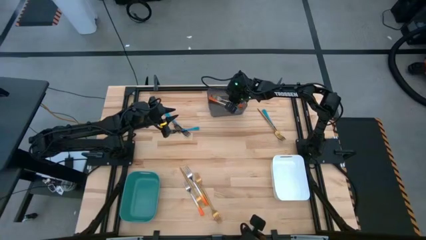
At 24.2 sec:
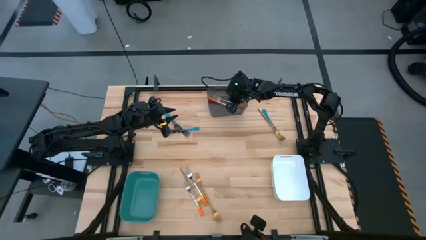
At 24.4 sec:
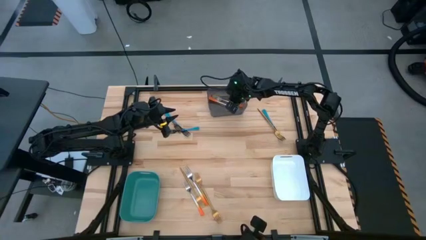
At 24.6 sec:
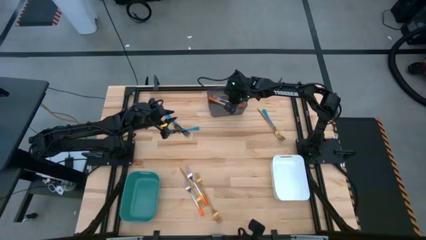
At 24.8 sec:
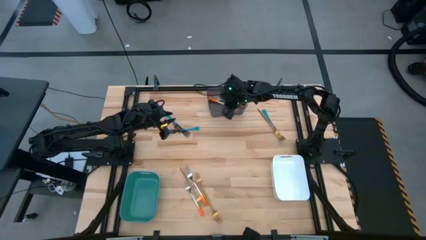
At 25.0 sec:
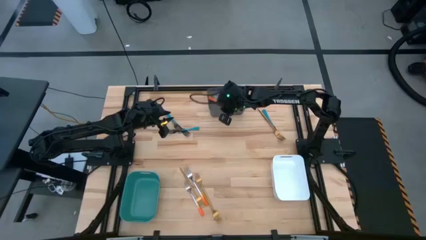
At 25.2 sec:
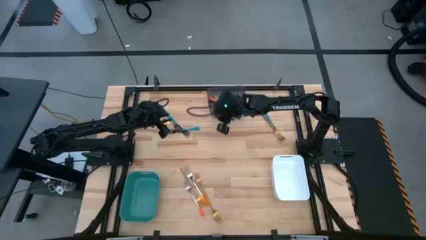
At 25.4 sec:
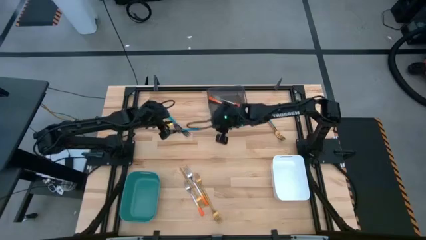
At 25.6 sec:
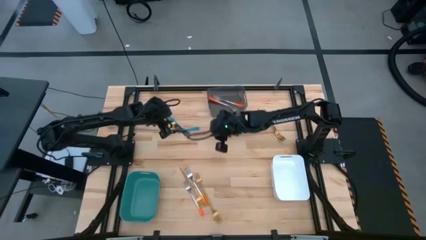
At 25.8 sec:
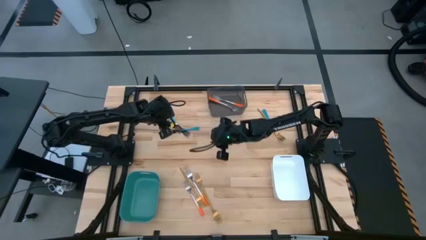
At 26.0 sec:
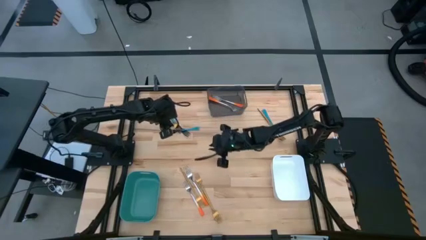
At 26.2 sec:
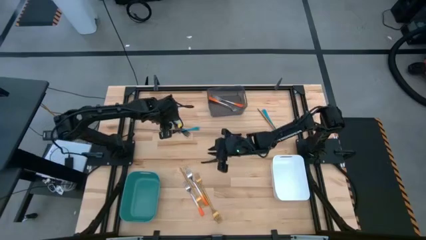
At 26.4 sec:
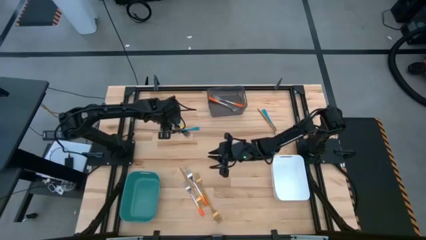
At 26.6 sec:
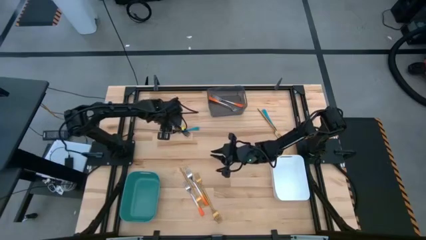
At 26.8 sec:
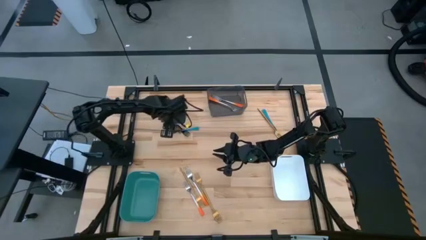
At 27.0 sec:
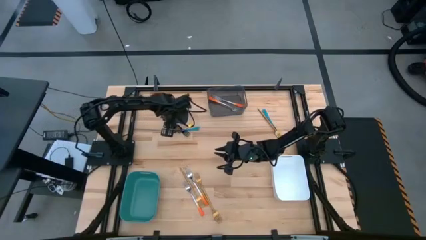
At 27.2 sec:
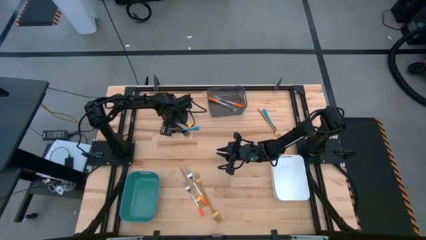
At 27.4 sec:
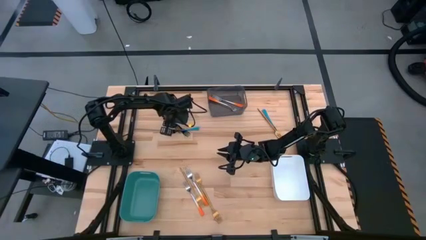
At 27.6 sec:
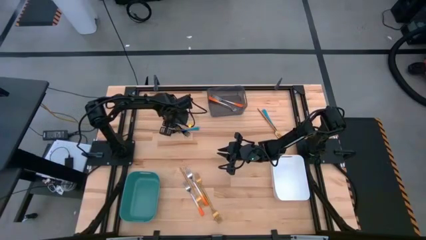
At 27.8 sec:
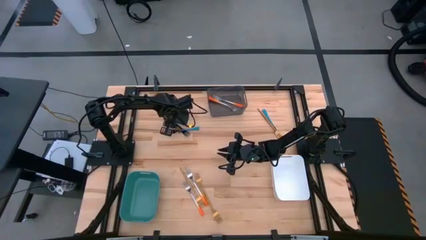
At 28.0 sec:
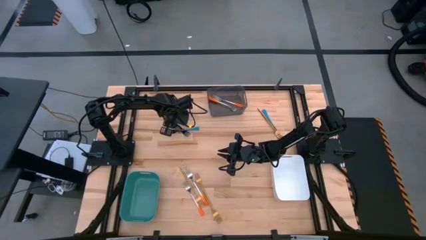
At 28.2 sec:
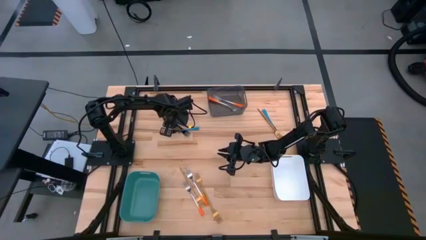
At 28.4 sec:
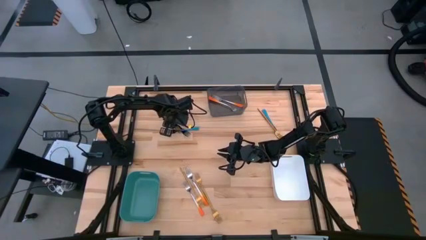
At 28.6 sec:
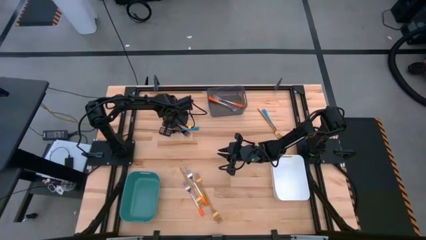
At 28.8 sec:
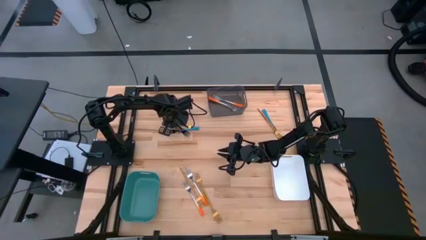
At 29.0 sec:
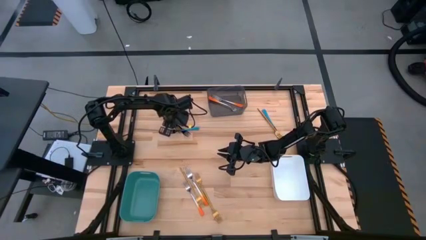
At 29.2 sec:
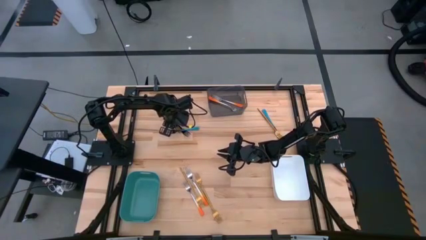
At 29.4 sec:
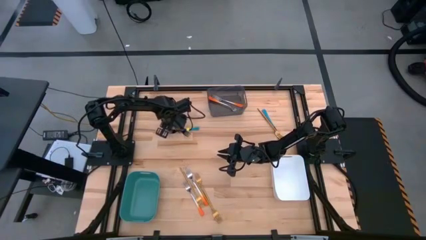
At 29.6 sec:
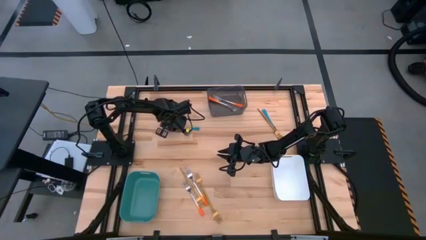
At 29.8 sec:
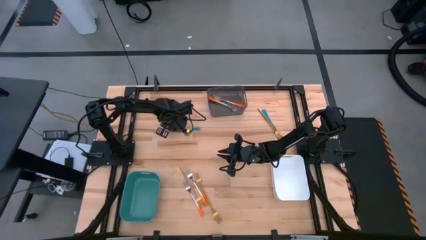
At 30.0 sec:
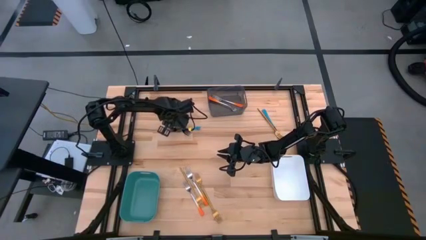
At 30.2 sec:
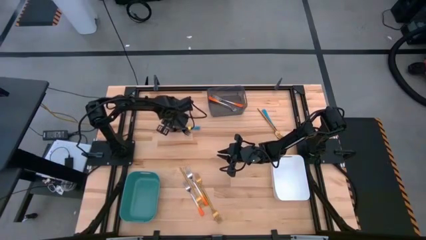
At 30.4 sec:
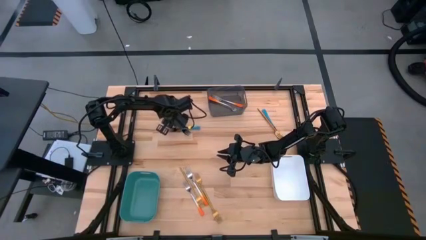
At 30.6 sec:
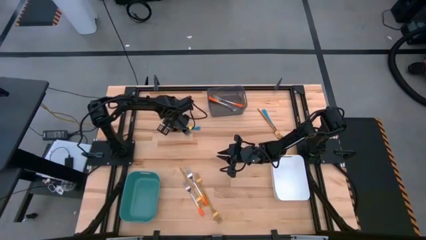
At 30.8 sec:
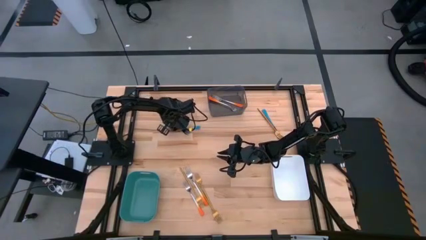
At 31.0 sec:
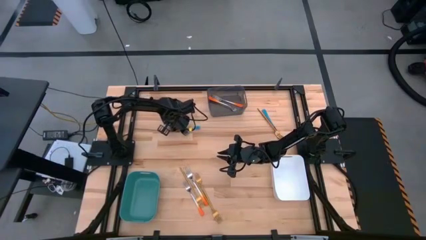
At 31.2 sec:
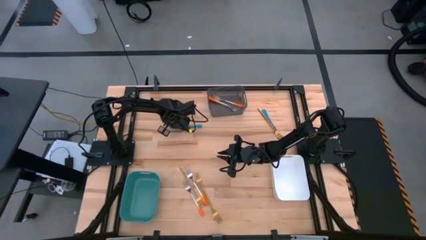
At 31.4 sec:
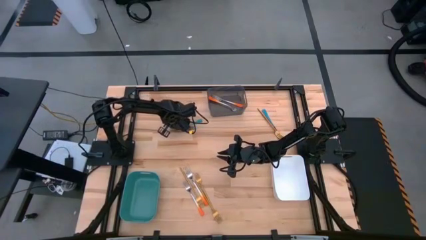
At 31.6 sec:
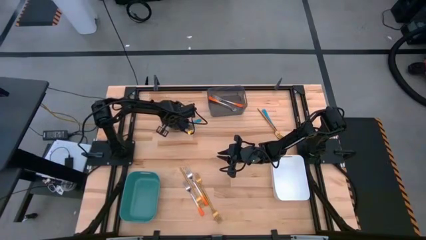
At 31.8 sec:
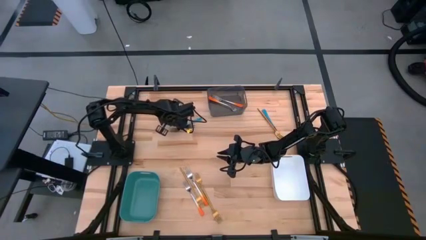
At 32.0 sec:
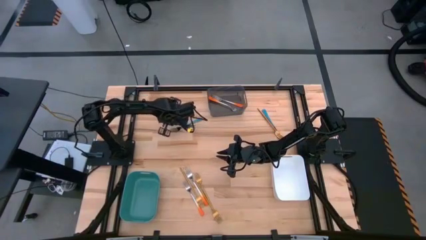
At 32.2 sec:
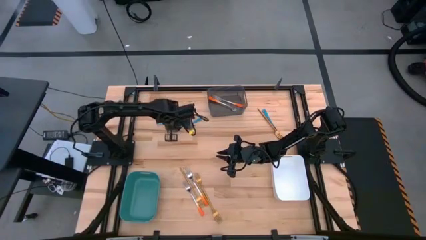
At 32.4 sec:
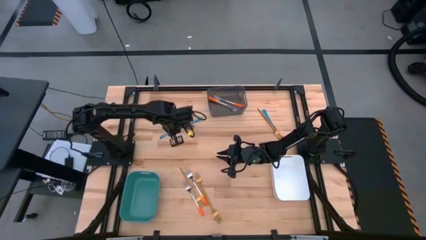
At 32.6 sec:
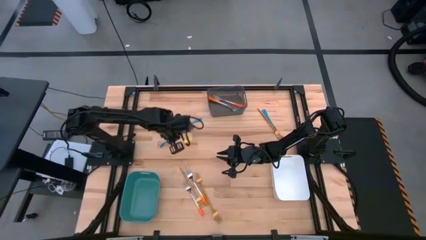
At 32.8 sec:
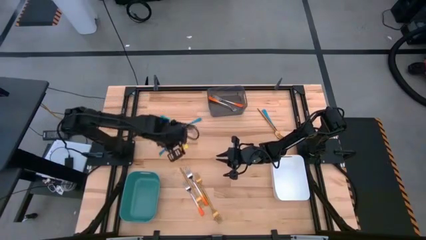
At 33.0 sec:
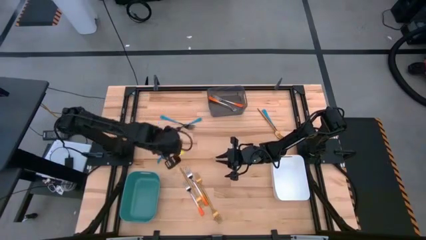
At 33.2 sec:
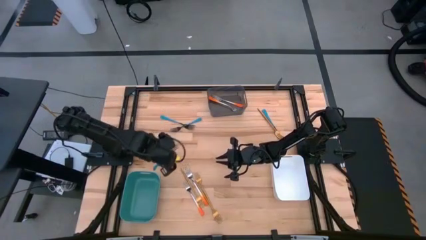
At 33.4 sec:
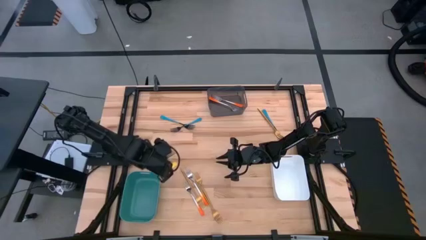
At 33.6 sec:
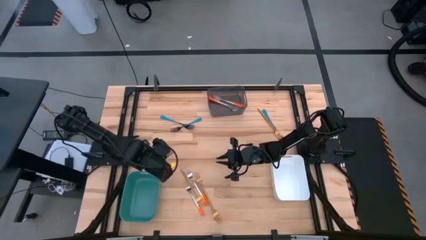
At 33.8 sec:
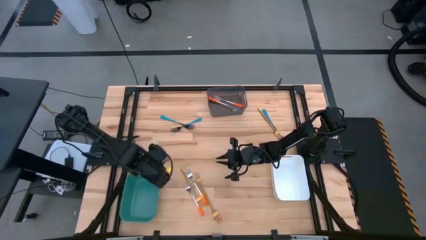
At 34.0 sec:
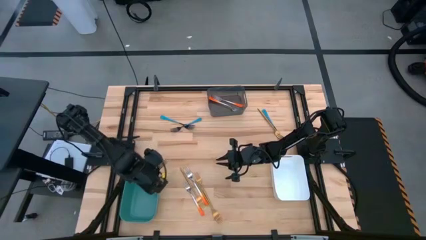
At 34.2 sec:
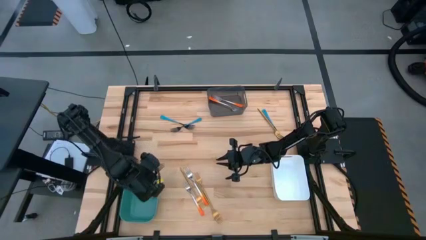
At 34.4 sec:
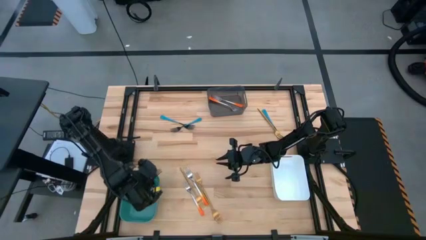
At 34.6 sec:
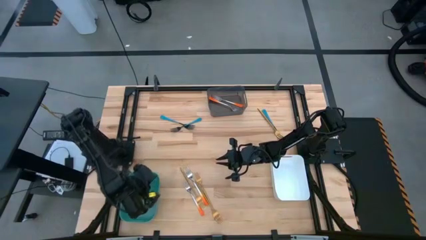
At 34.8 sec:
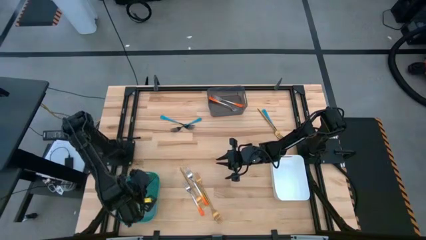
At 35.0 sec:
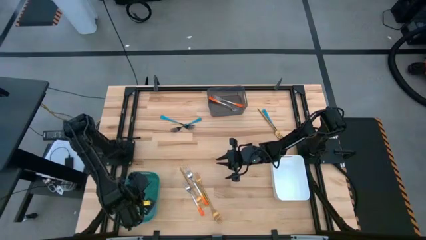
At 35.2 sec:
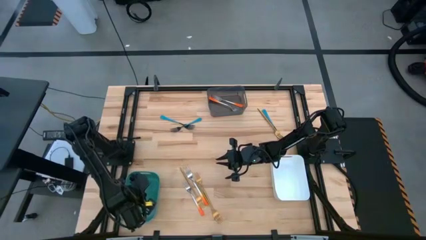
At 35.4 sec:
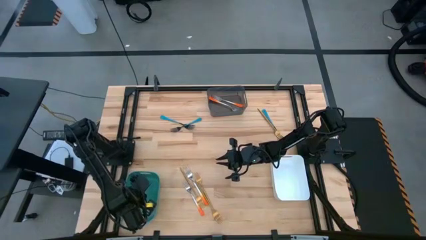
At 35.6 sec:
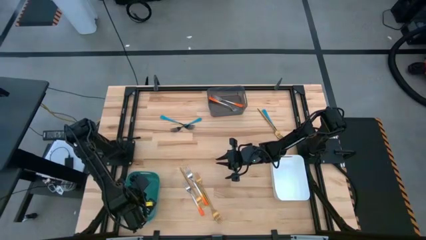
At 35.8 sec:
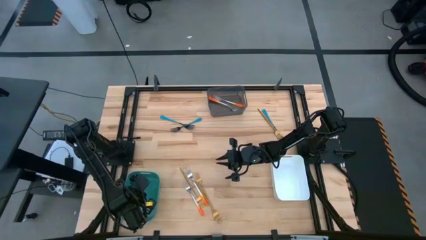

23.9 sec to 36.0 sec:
Task: Sort silverware by color (type)
Put the blue fork into the green bin
